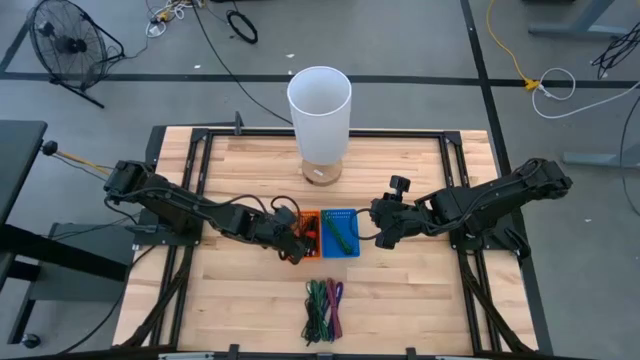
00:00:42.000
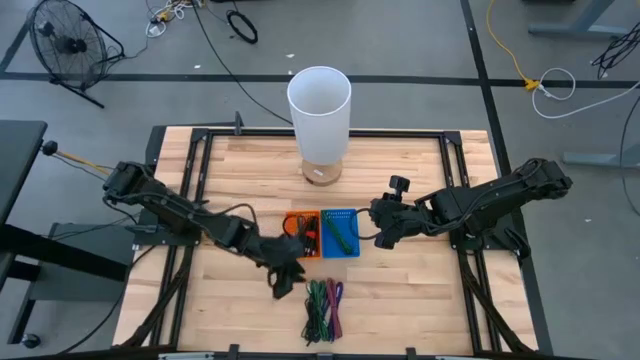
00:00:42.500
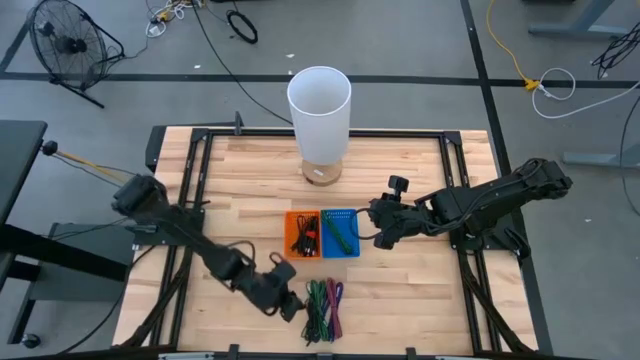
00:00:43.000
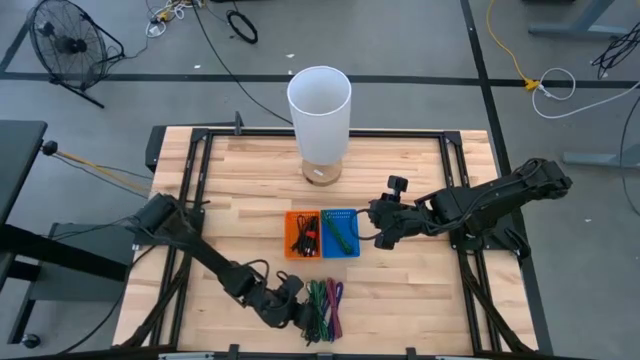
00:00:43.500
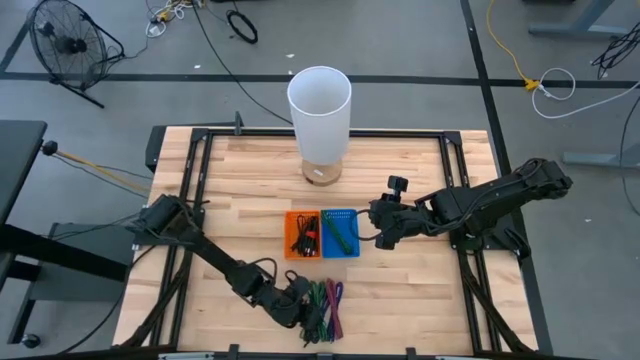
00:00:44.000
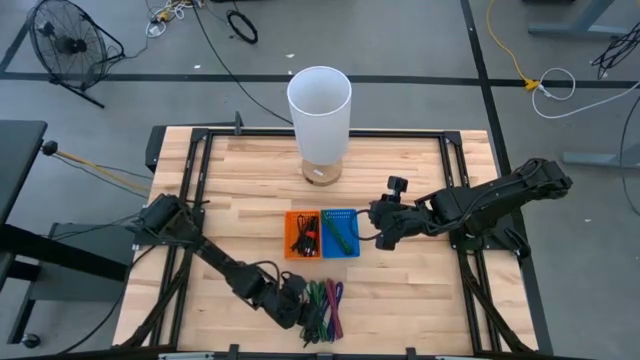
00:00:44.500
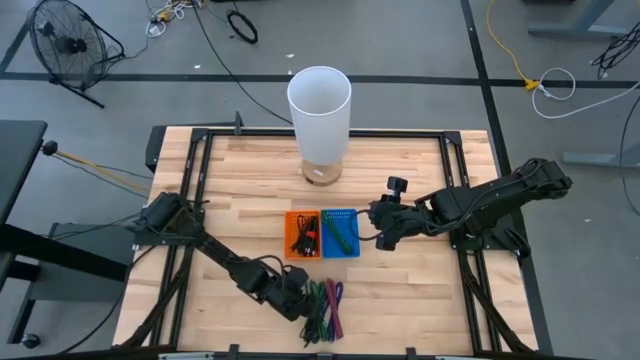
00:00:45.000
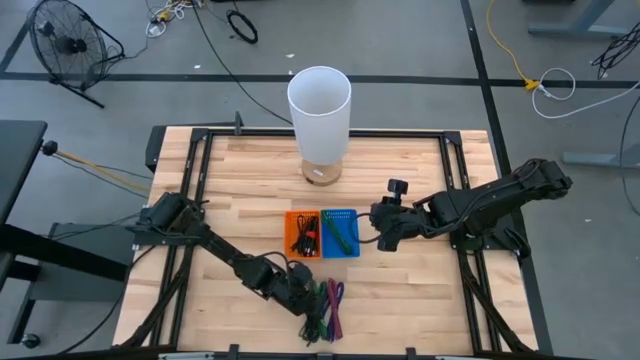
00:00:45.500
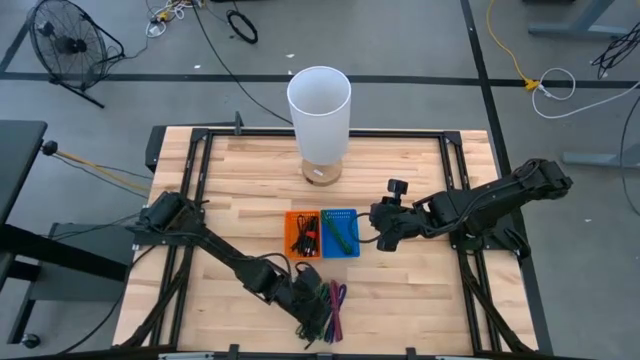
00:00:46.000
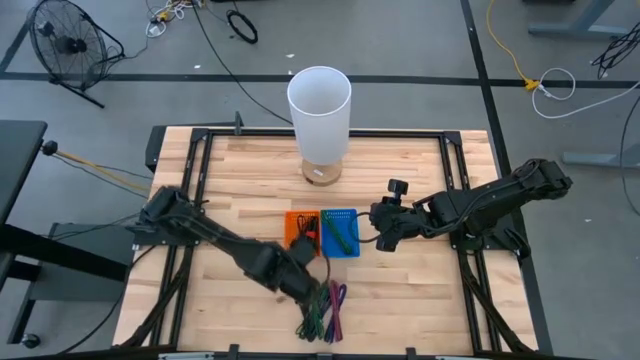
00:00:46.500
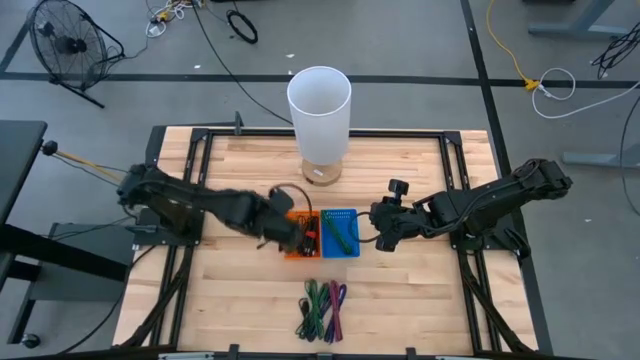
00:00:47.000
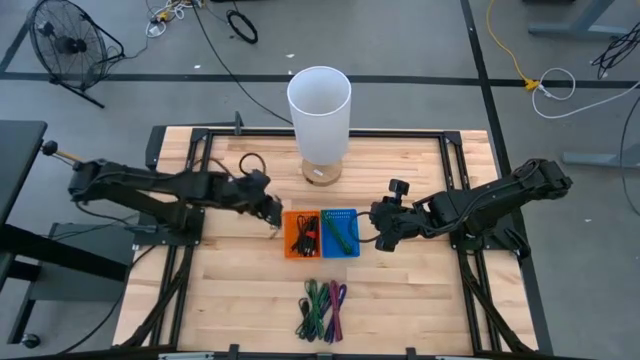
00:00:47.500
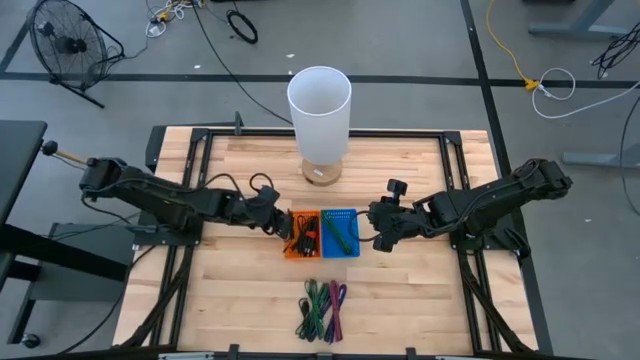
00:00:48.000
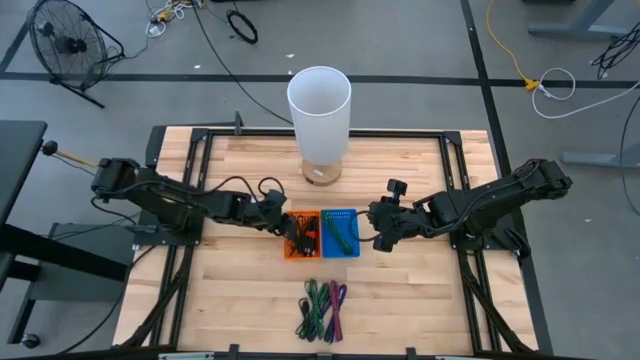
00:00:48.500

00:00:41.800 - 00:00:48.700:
Task: Pick & Place USB Port
Put the black USB cable into the orange bin

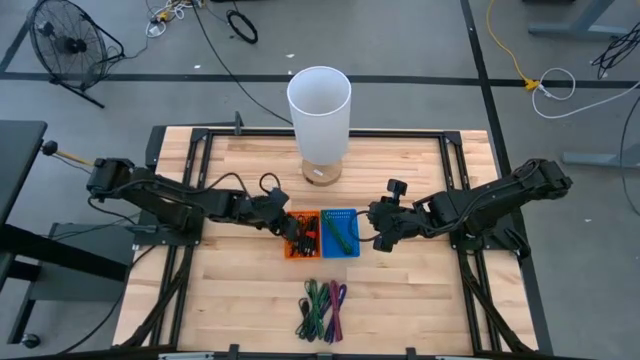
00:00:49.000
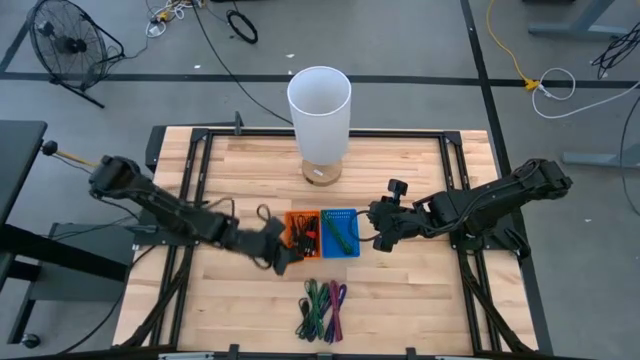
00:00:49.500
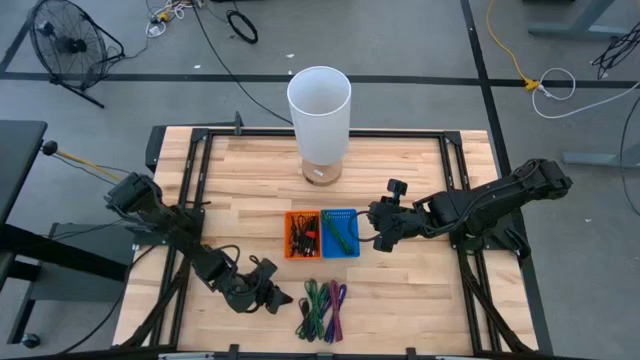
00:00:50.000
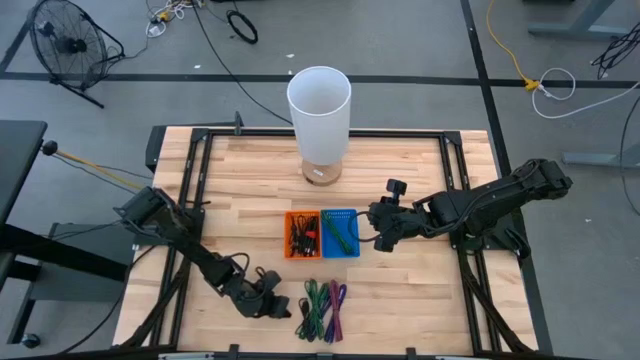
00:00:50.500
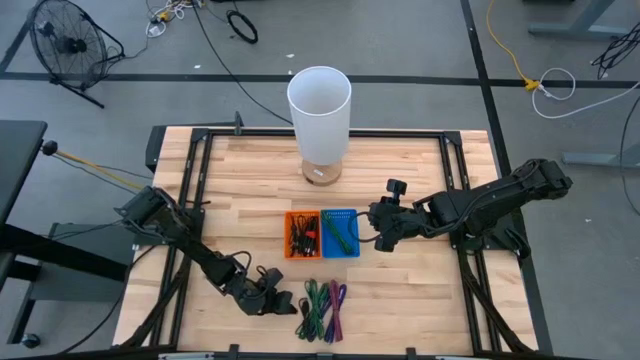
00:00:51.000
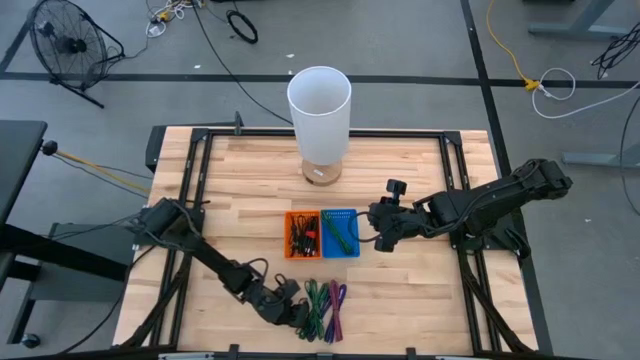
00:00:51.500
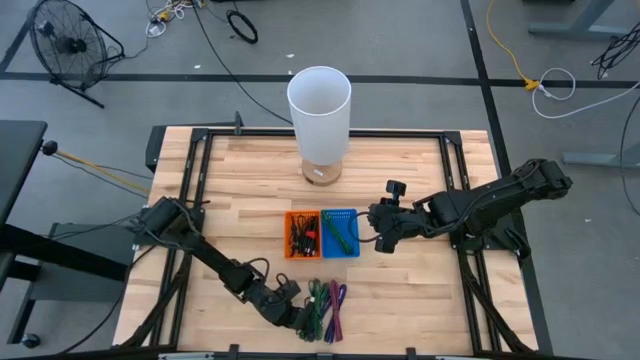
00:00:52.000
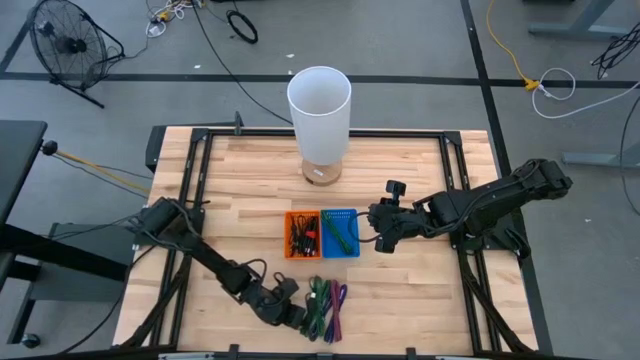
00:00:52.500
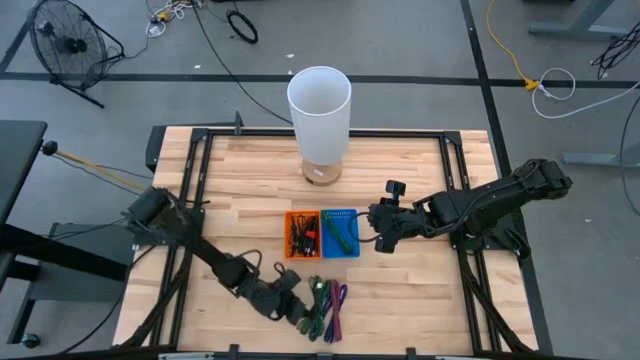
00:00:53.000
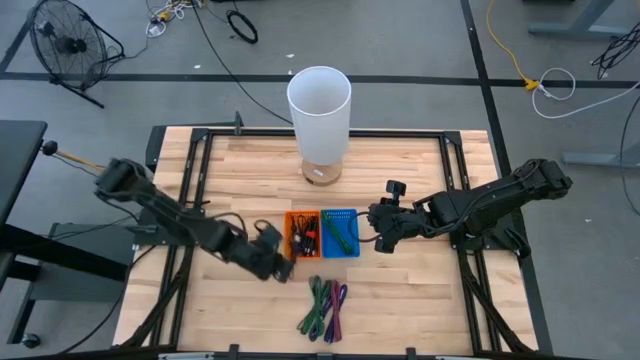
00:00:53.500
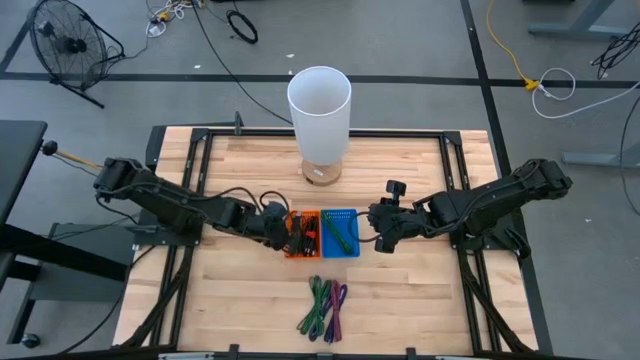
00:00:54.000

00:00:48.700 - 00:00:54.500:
Put the black USB cable into the orange bin

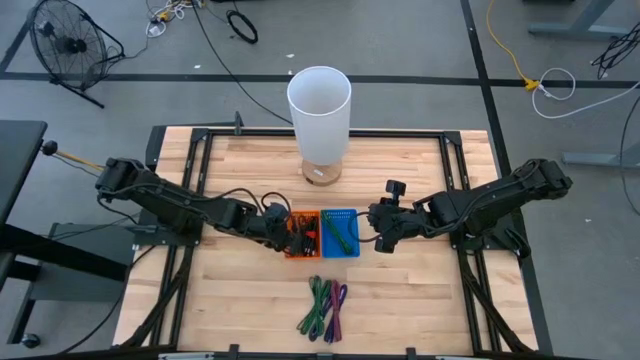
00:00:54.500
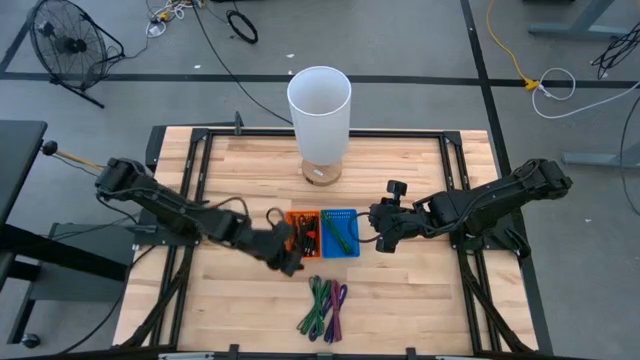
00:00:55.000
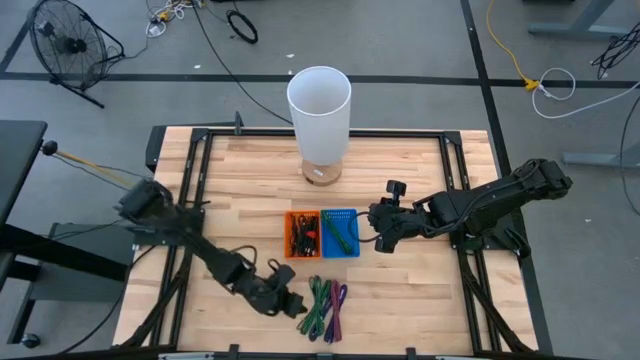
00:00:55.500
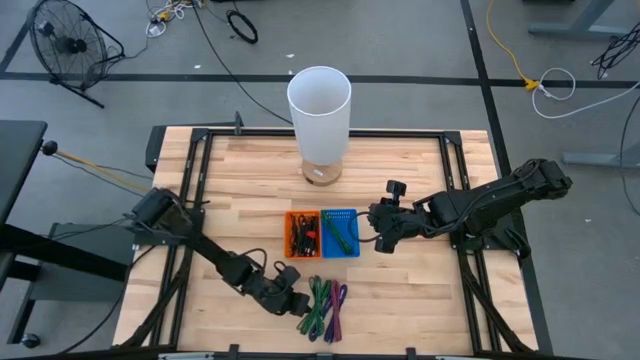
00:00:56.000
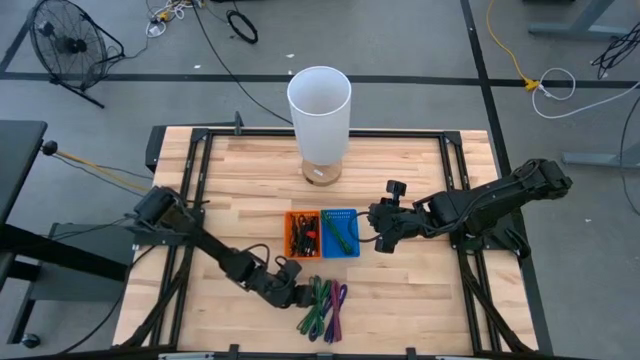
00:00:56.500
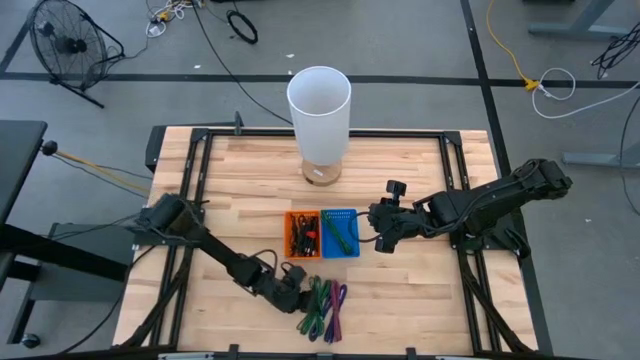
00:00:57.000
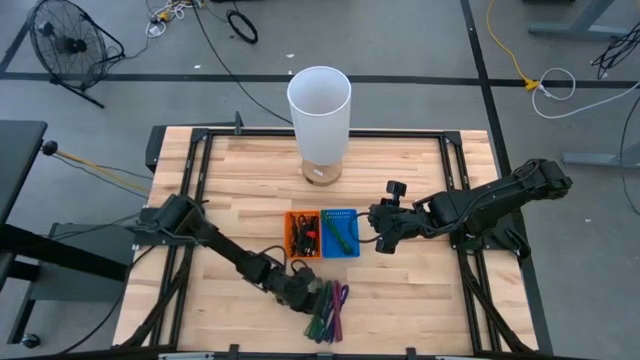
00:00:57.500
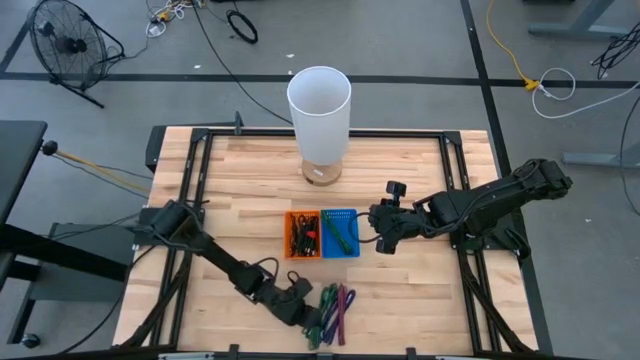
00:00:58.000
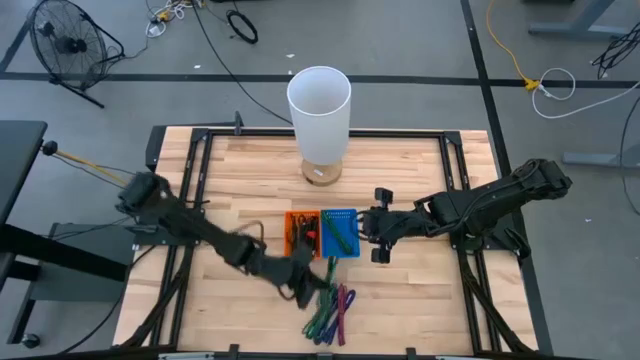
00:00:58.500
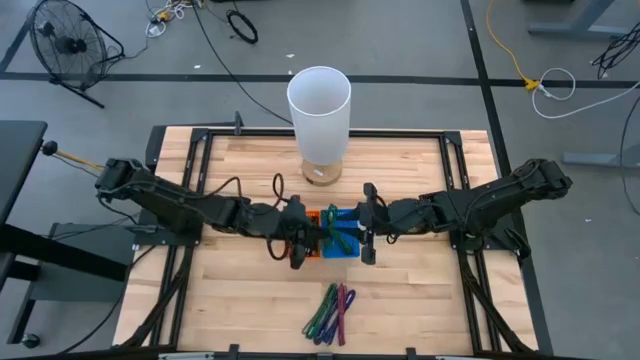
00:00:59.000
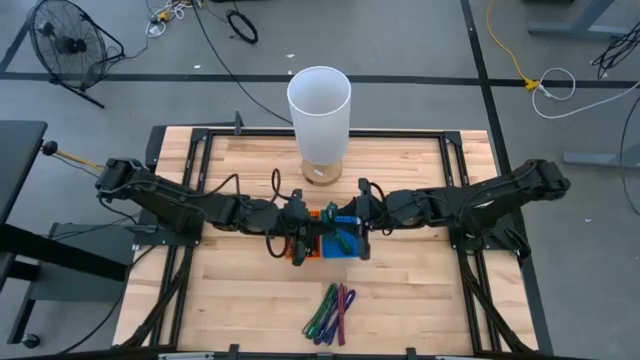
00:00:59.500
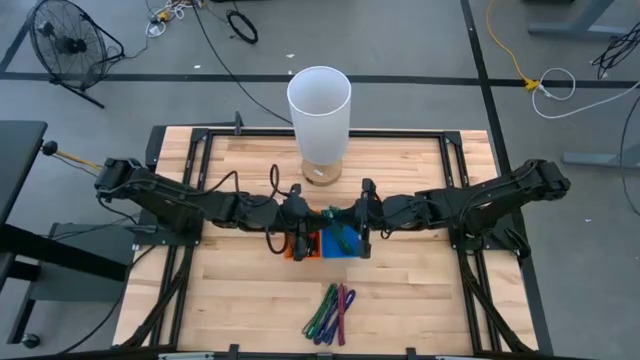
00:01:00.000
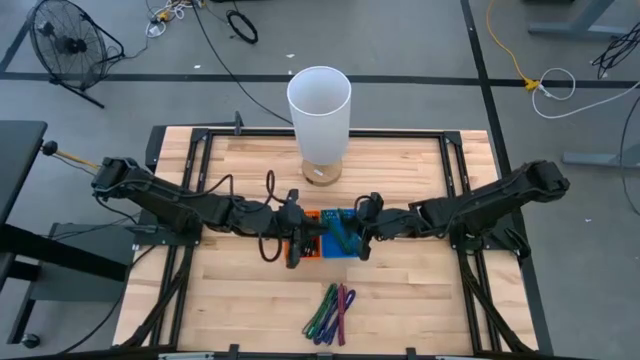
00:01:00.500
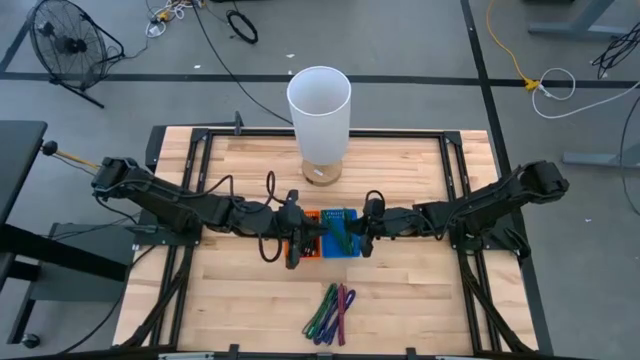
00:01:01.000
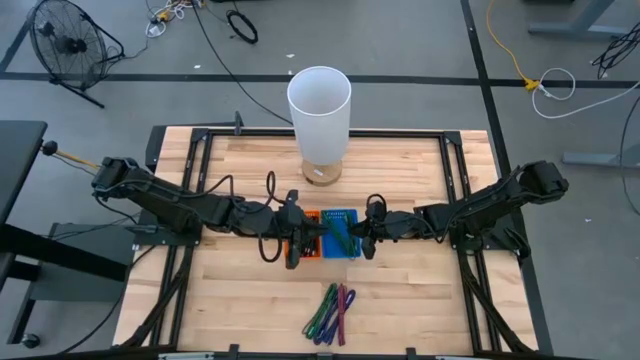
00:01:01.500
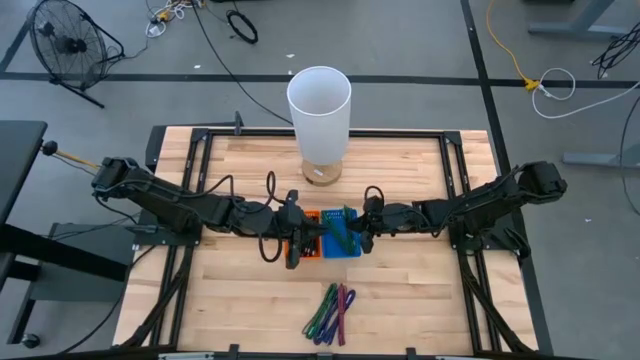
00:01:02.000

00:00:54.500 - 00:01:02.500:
Put the green USB cable into the blue bin

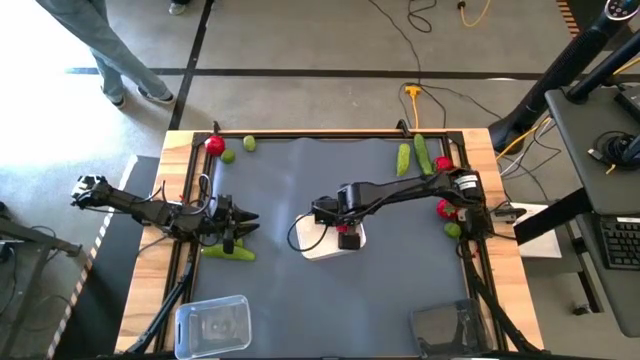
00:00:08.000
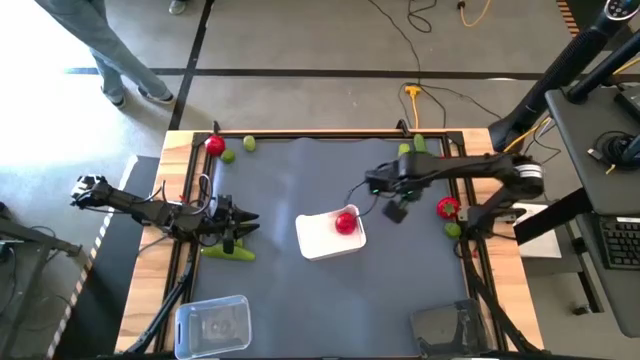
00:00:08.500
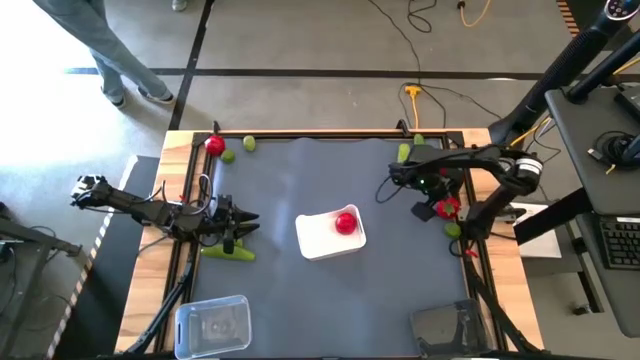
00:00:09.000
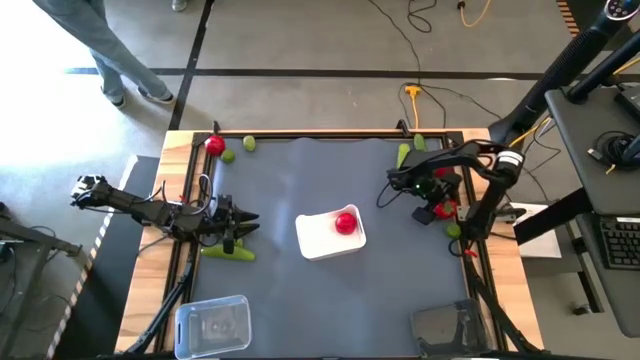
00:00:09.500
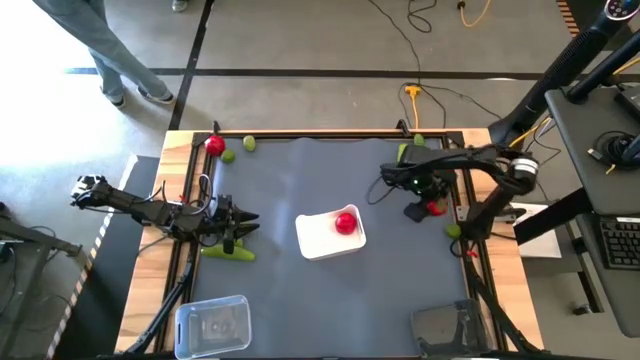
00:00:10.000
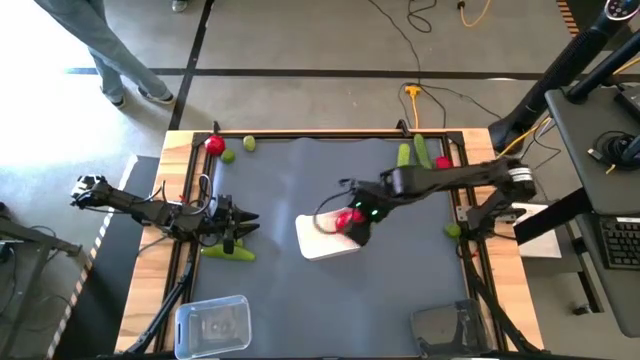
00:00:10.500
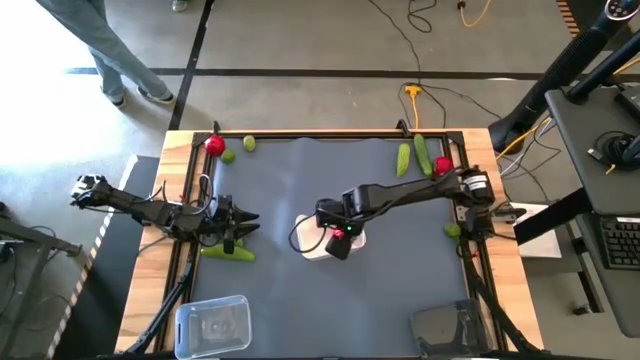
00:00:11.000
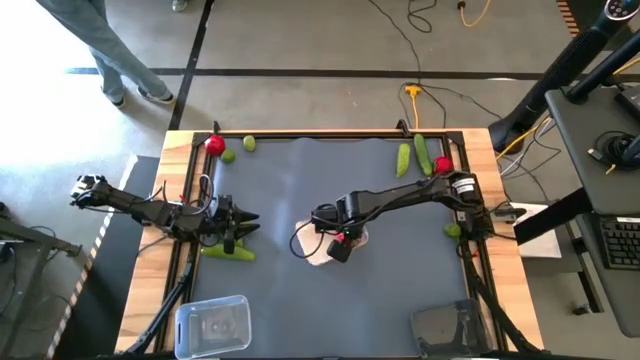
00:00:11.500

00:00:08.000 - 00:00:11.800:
Task: Sort produce into baskets
Put the bottom tomato into the white bin
